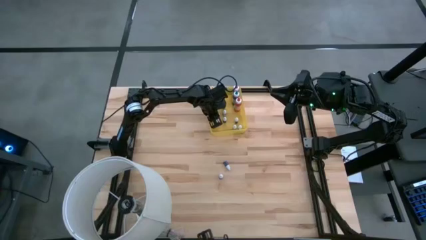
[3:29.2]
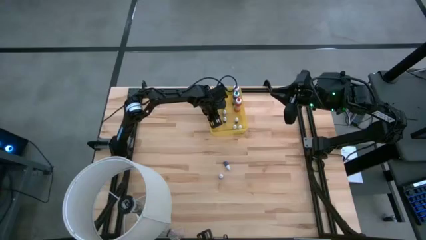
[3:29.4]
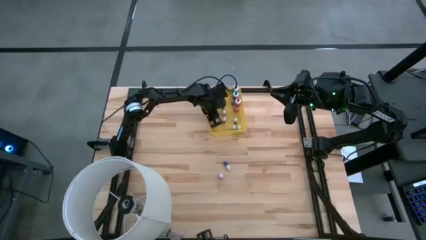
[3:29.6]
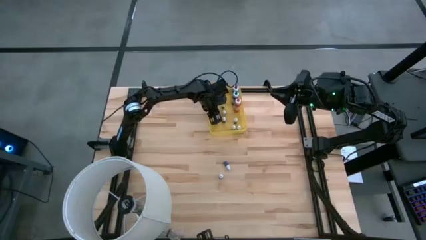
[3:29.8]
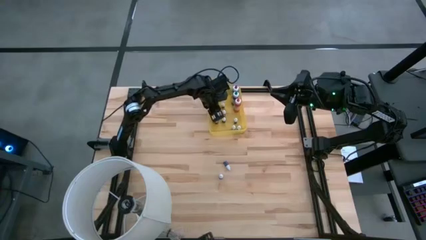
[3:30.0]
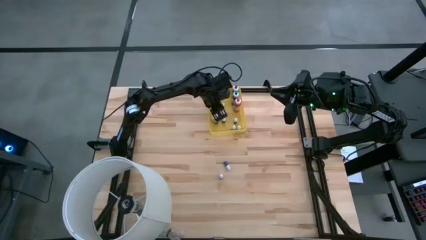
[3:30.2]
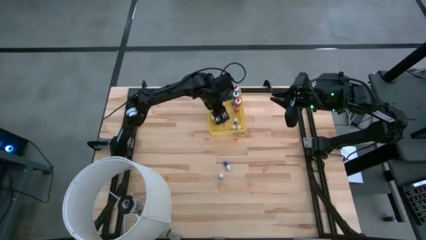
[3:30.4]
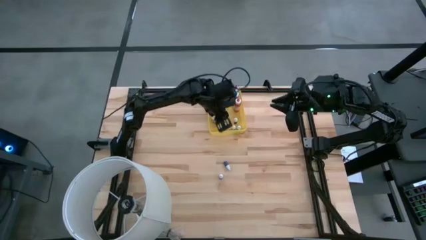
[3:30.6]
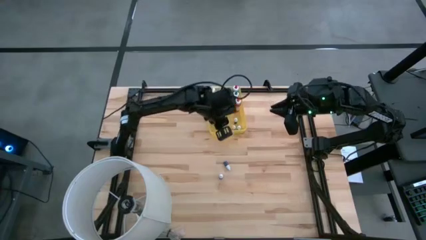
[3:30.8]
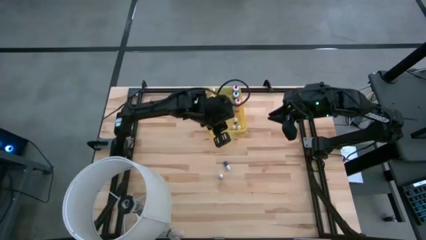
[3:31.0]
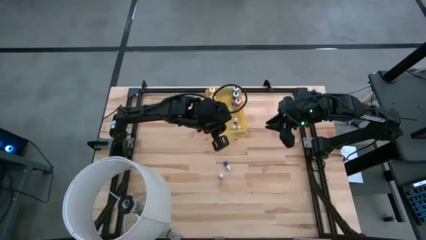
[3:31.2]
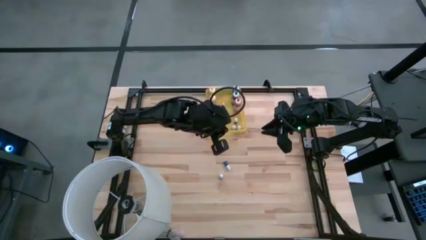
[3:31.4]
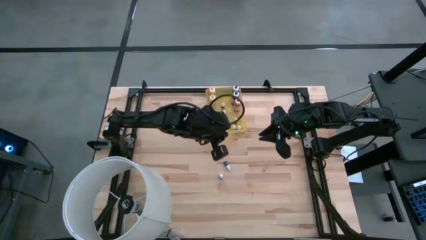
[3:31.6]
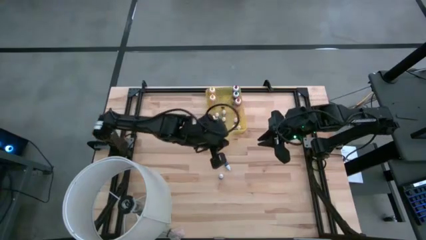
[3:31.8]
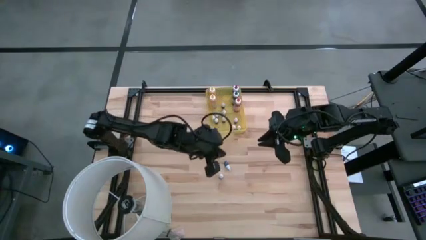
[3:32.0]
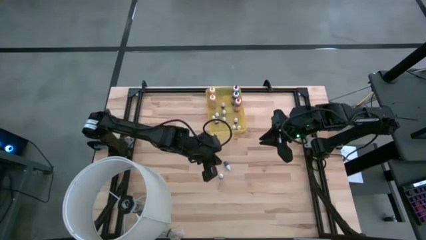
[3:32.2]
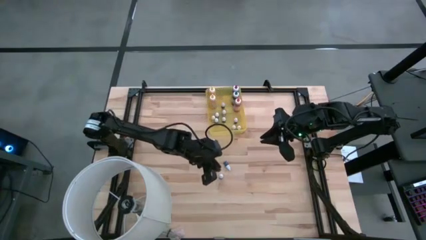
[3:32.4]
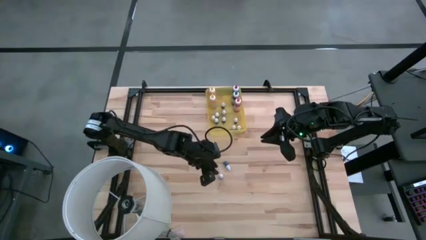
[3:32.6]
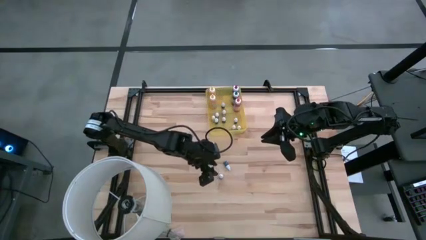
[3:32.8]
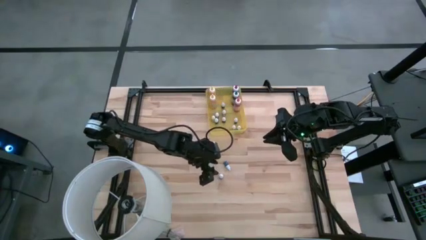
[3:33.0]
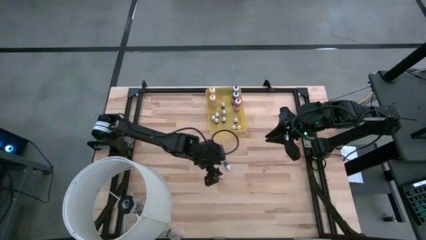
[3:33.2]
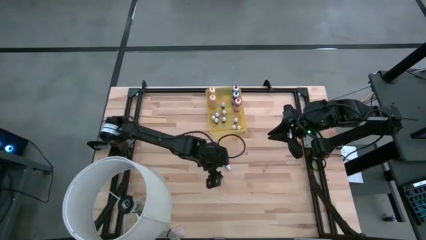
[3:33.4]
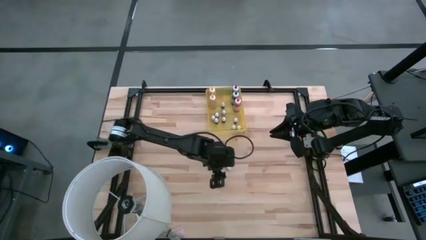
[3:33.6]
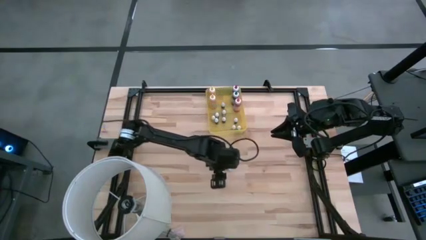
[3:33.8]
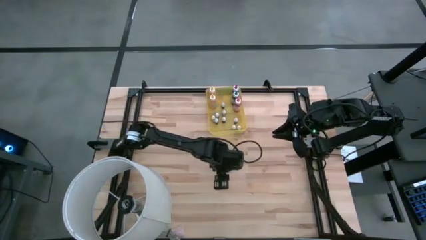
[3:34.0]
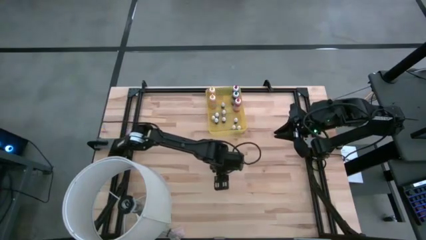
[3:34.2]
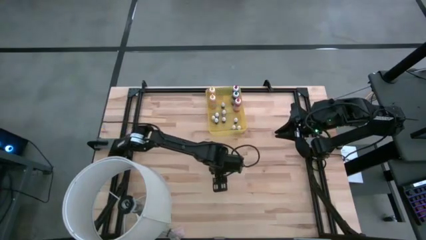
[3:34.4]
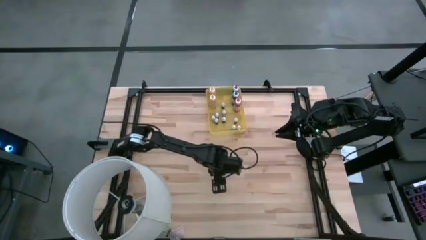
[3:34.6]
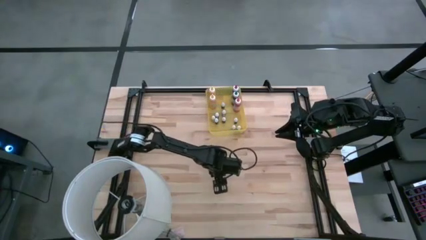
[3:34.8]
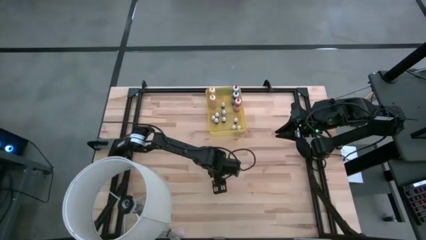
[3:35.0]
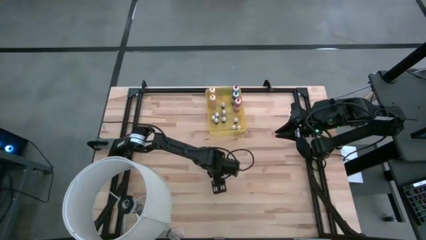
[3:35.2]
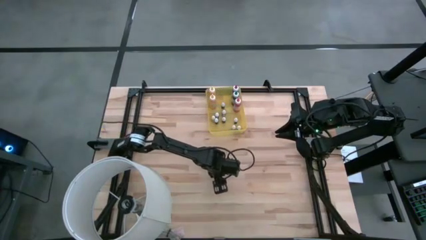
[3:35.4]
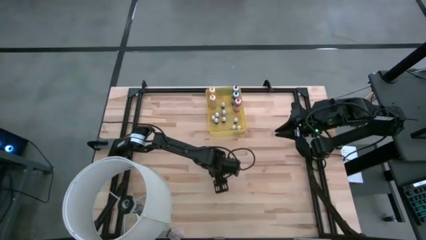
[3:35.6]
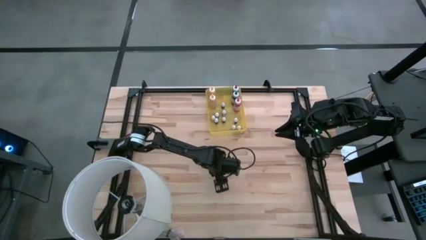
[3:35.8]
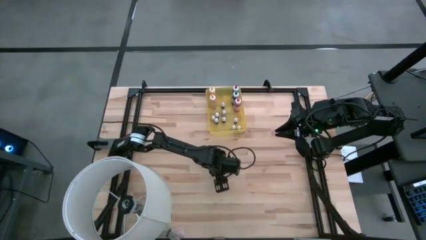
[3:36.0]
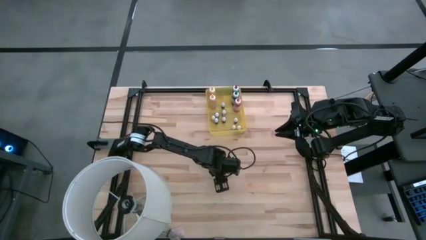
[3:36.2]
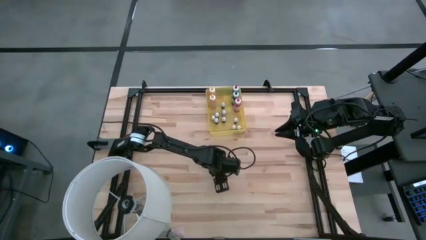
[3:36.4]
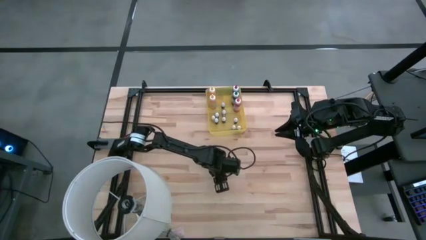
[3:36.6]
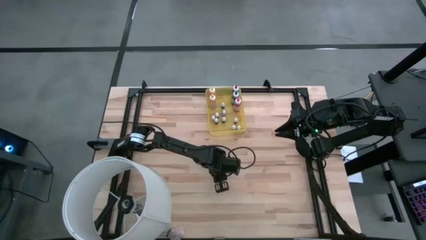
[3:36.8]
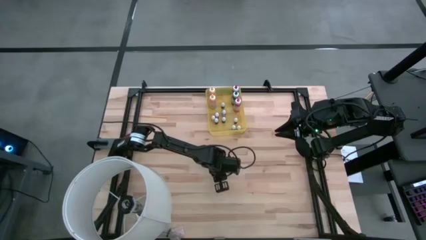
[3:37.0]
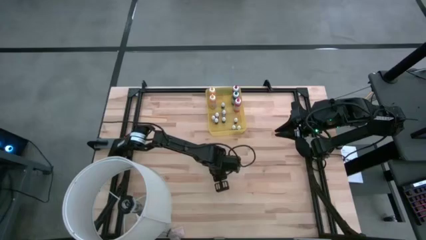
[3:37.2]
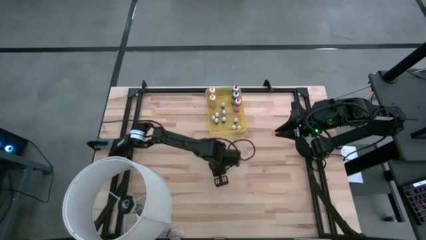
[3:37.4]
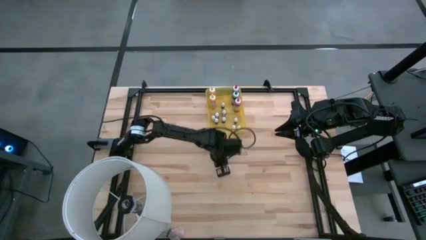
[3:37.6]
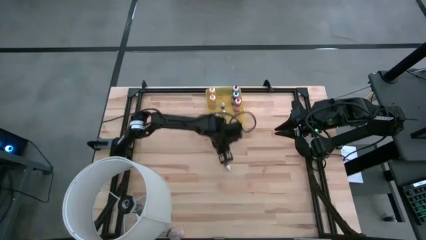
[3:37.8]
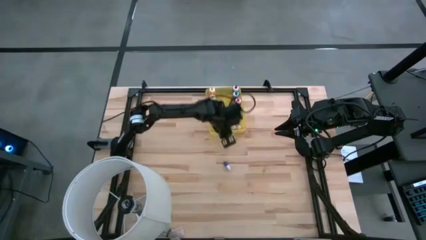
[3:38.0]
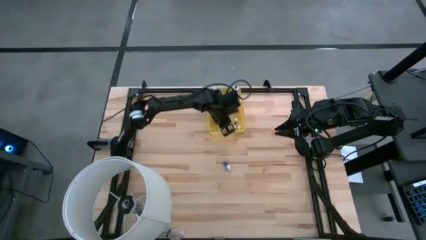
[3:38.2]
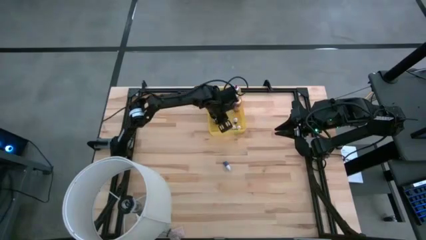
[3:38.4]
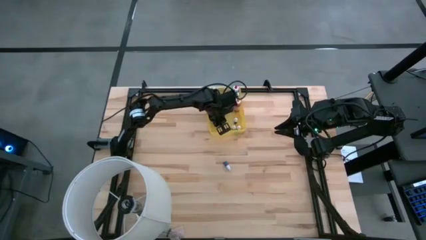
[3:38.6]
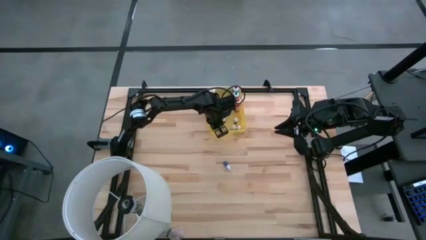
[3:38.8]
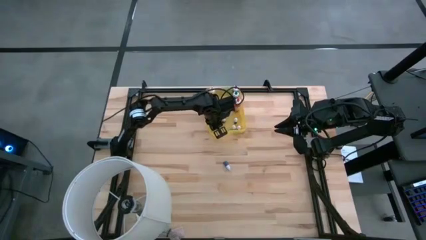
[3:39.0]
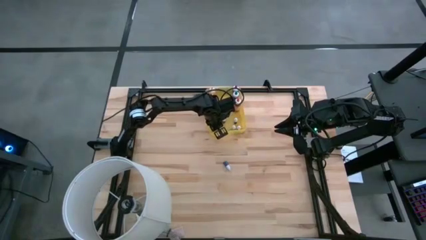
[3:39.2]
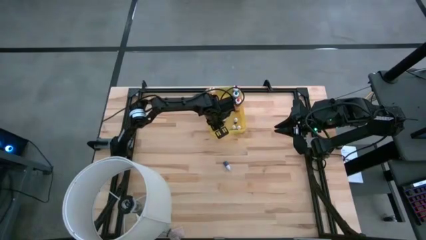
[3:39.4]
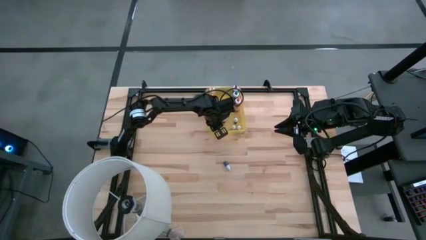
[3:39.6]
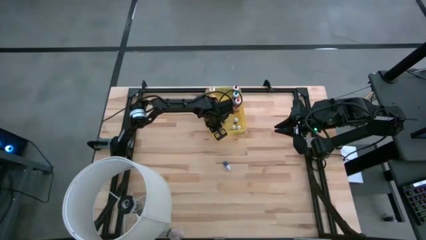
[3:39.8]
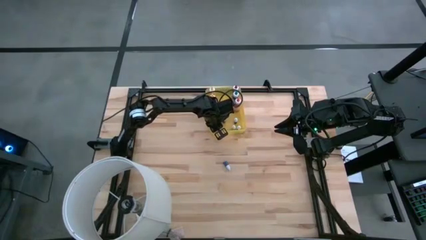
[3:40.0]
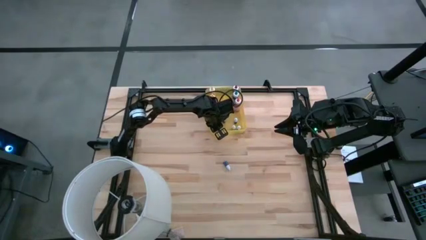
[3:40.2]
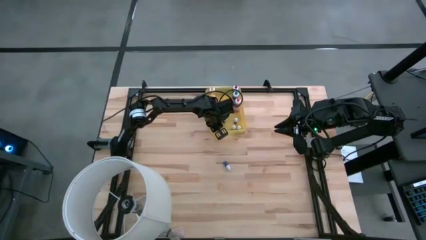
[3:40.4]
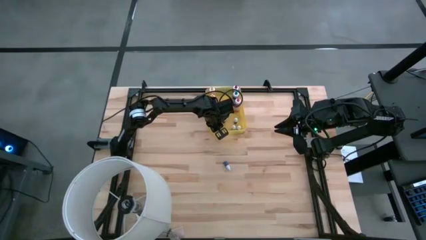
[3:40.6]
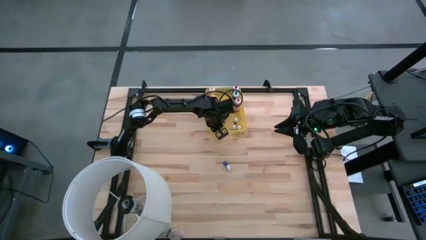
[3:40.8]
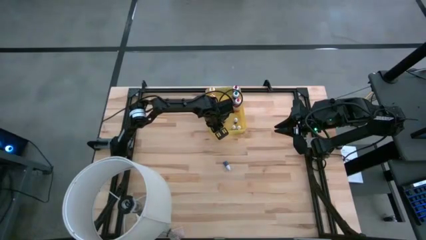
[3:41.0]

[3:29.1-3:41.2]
Task: Pick & Place food coloring
Put the small red food coloring bottle into the yellow bin
